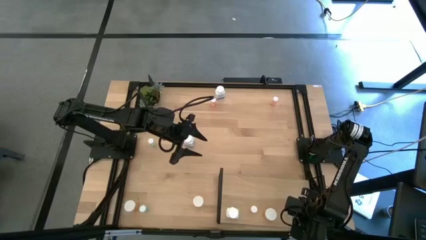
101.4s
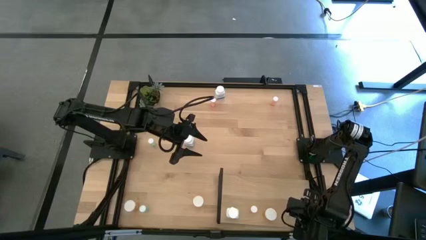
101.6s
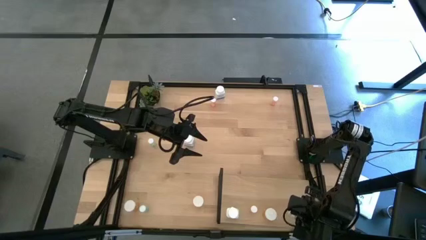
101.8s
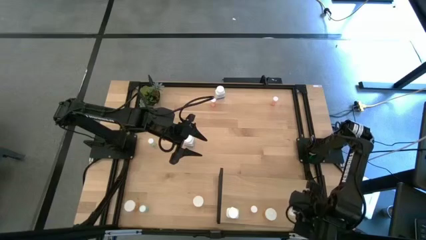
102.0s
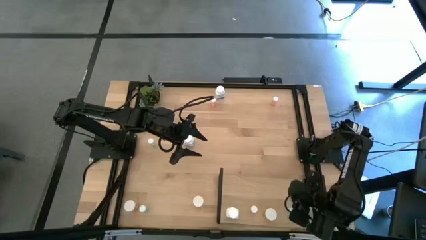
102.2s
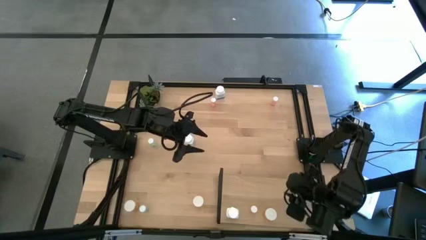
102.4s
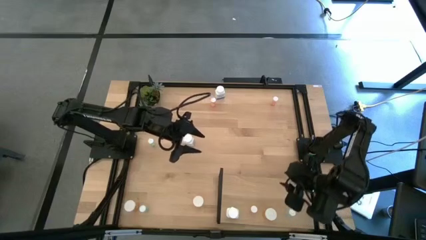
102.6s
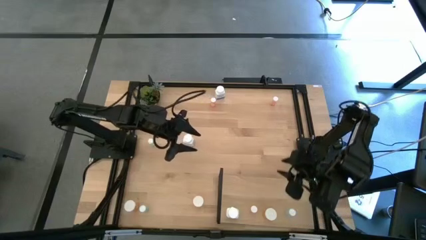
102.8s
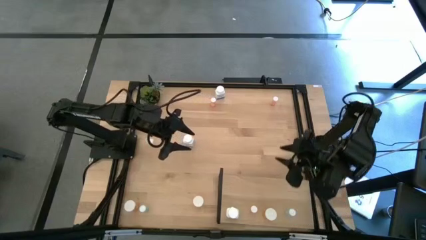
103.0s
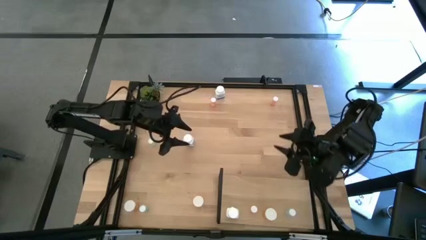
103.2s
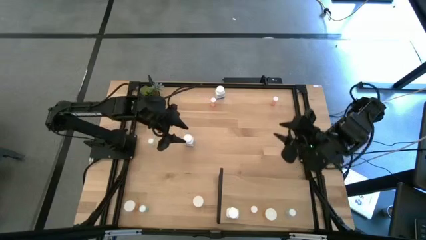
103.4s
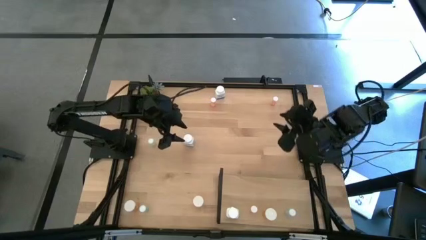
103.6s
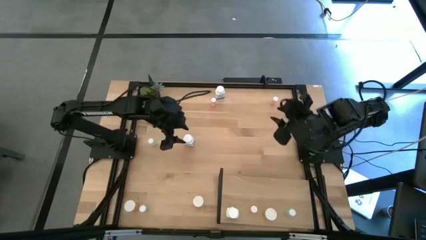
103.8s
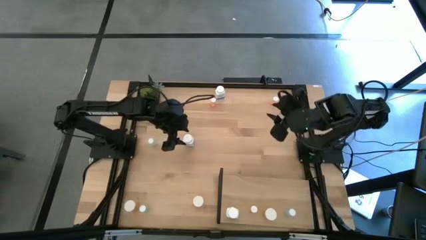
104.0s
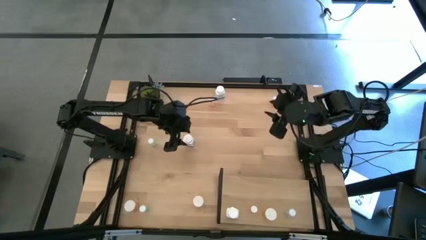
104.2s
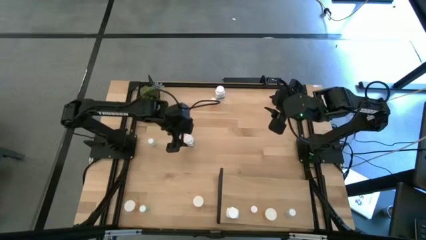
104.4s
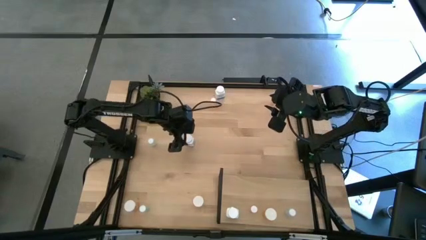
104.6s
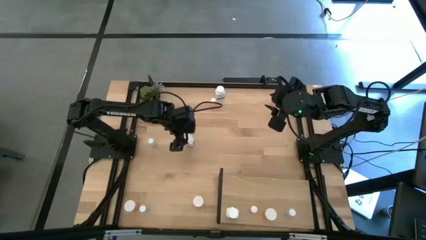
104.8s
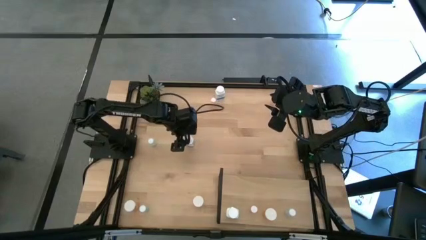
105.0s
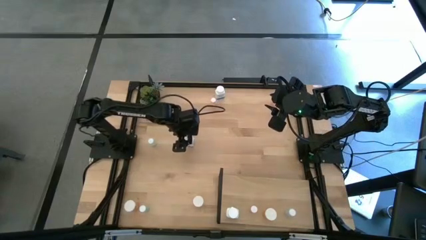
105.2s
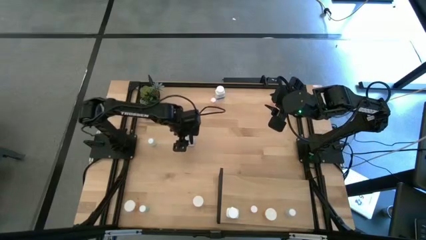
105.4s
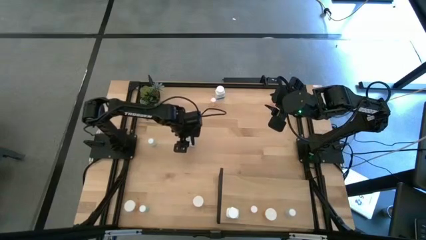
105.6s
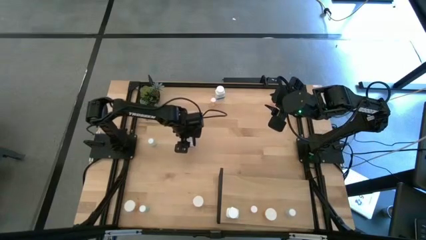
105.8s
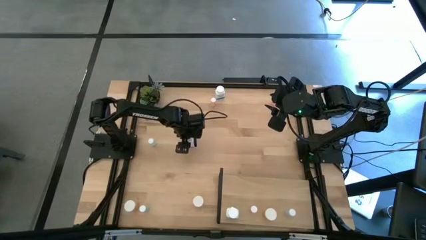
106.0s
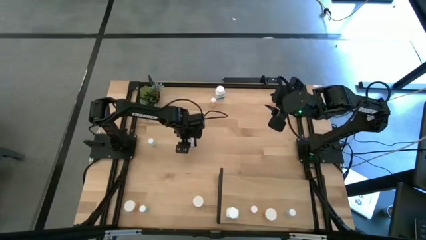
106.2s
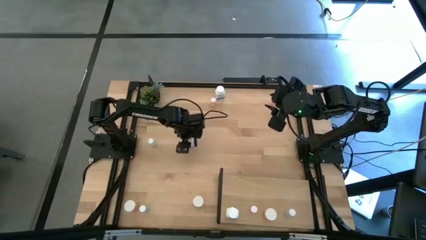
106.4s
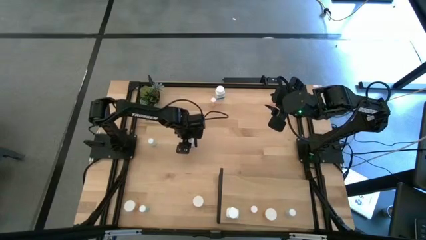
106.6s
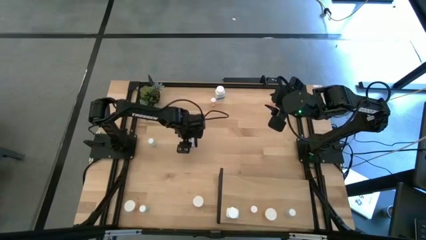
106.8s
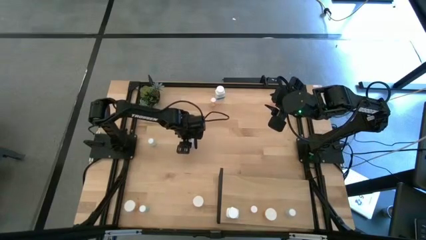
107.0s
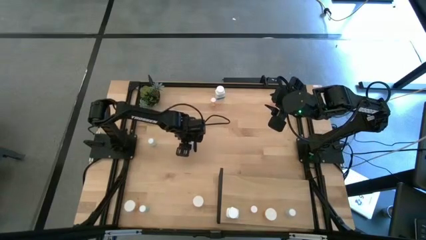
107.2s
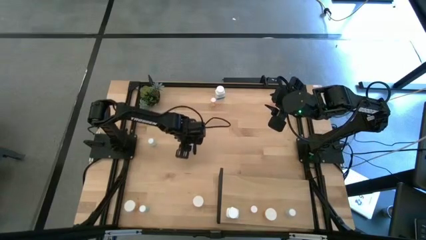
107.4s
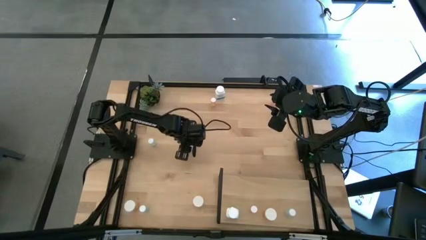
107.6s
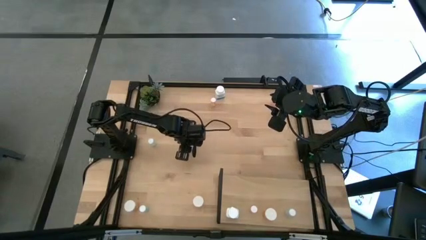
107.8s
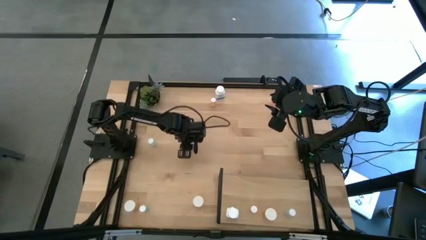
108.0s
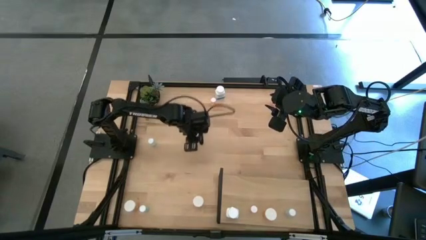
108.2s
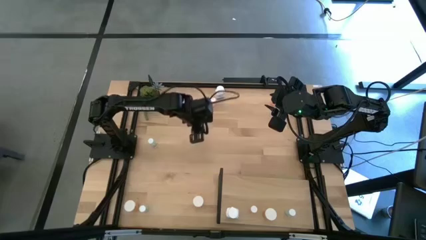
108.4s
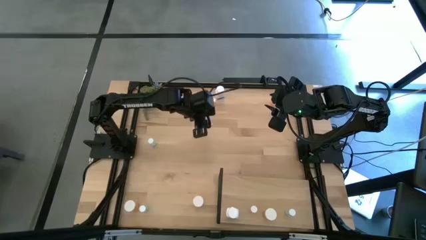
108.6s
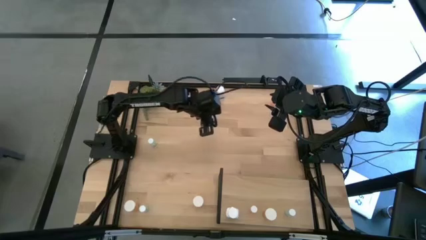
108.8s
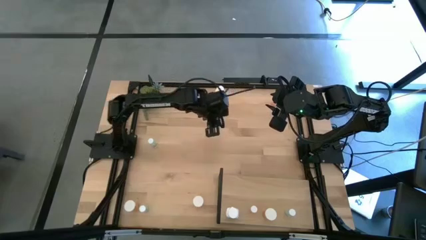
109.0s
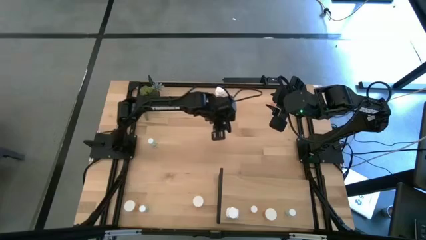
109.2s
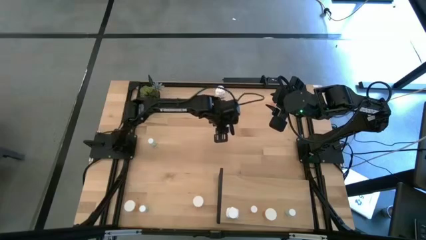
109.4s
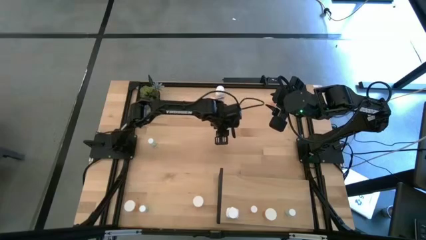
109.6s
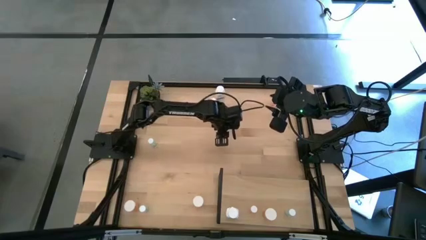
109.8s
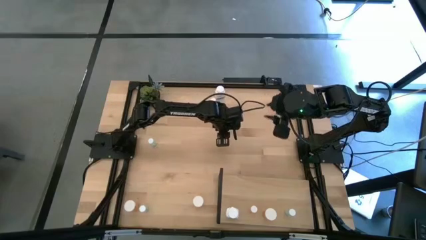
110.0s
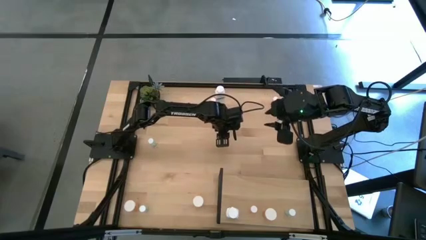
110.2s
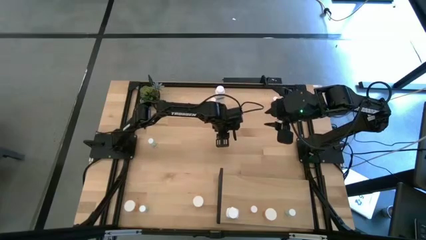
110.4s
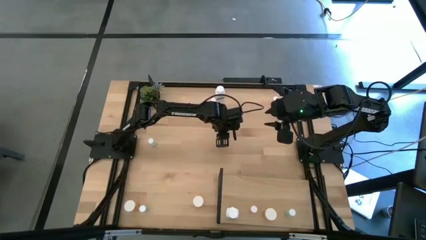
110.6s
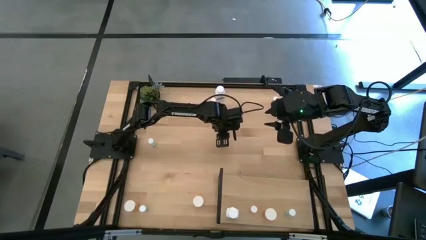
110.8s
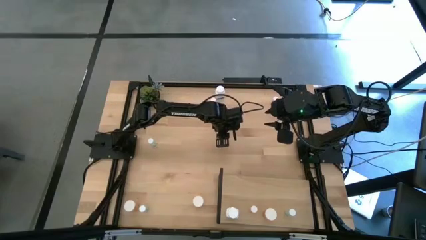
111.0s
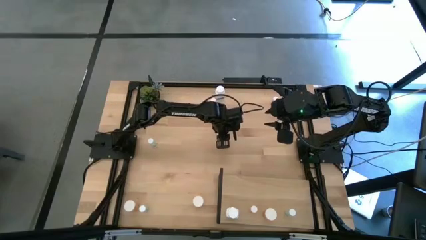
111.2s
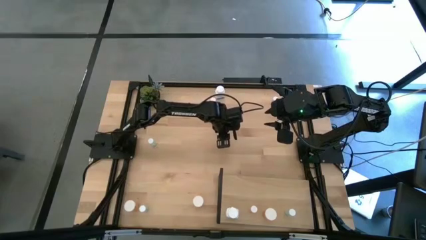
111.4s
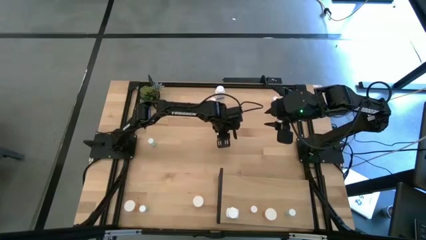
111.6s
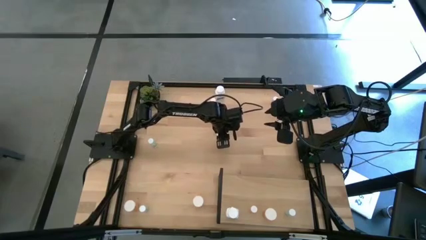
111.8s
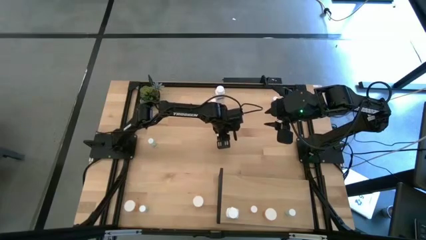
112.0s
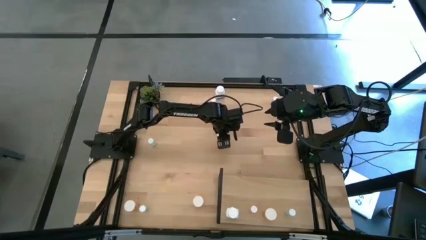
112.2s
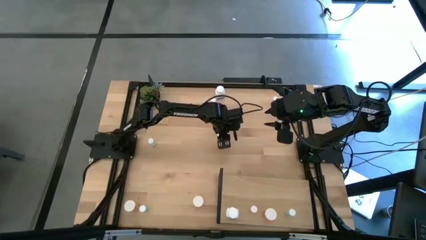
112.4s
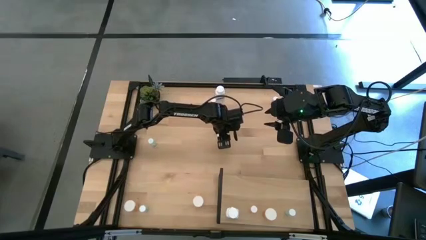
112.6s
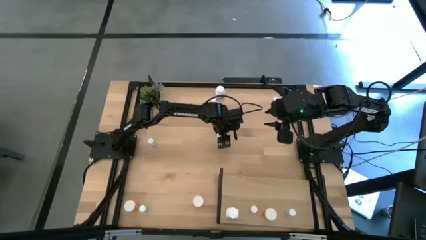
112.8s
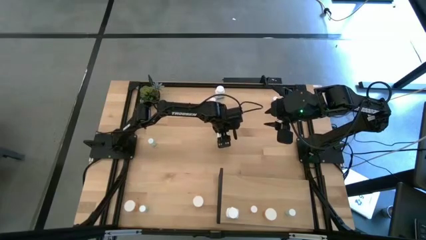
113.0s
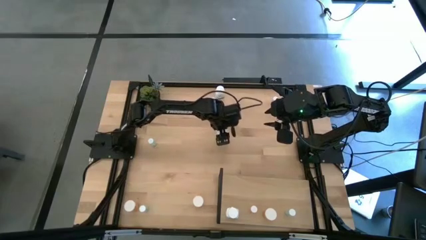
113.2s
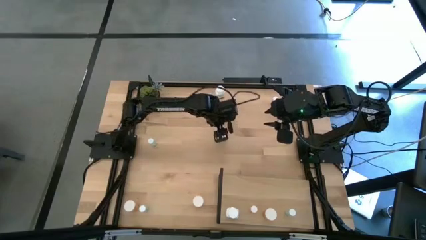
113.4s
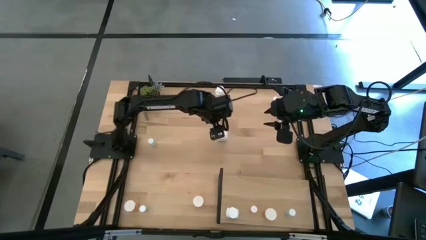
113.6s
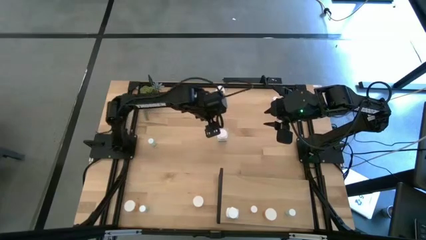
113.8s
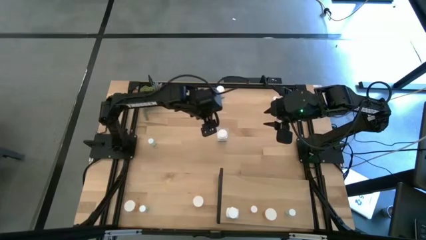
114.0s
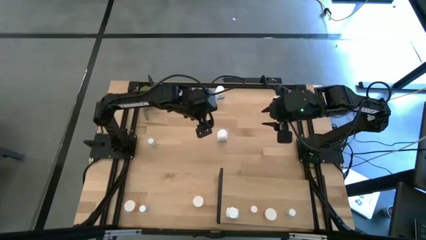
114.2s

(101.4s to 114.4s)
Task: Pick and place medicine bottles onto shelf by color
Put the middle white pill bottle on the shelf
